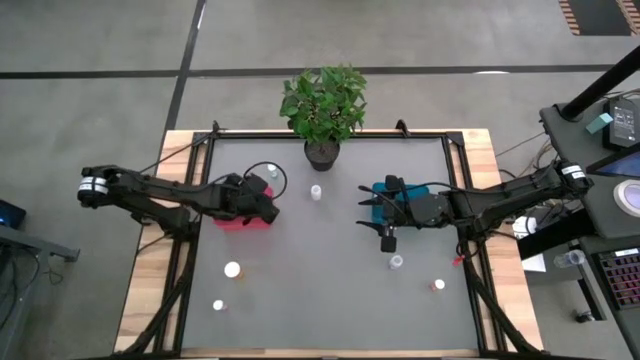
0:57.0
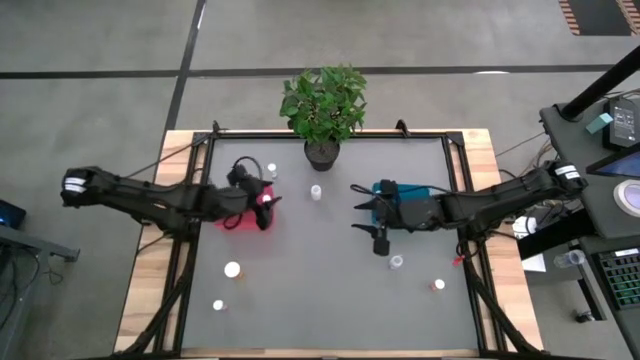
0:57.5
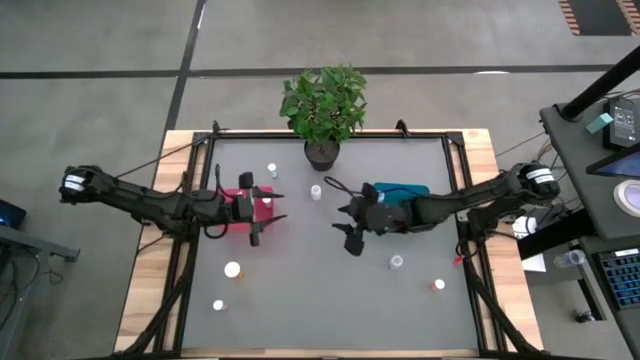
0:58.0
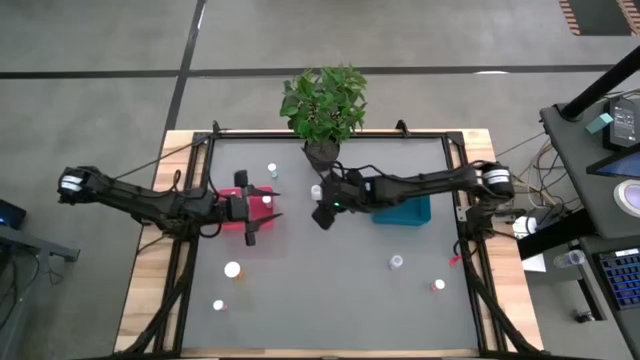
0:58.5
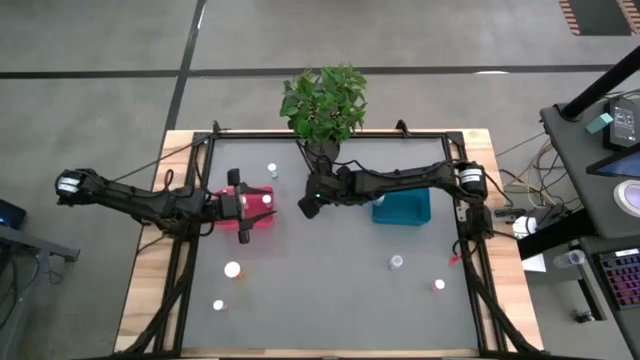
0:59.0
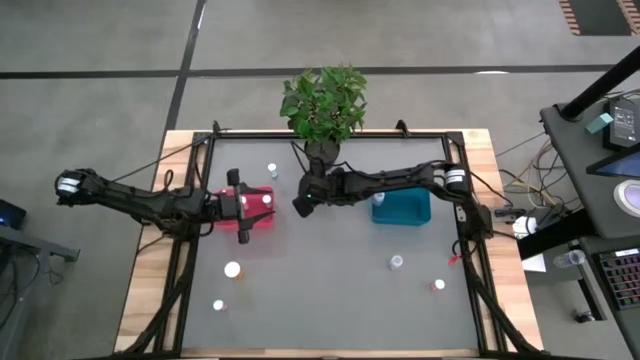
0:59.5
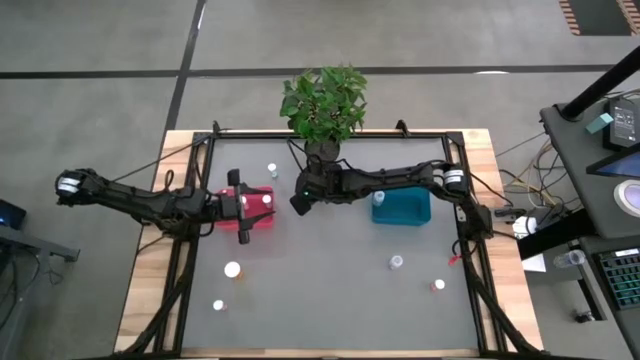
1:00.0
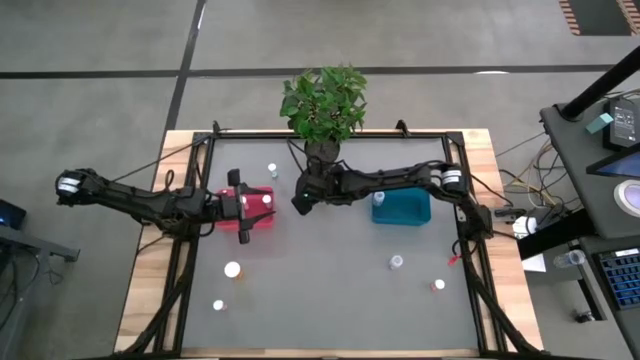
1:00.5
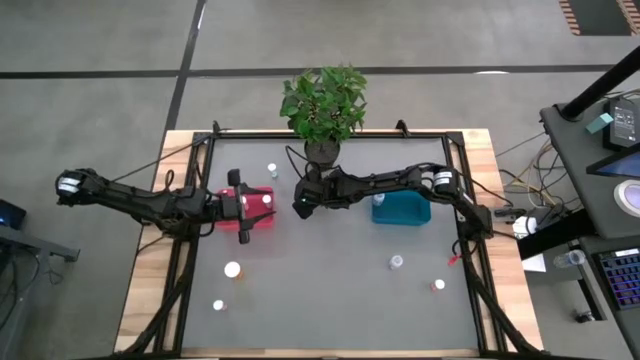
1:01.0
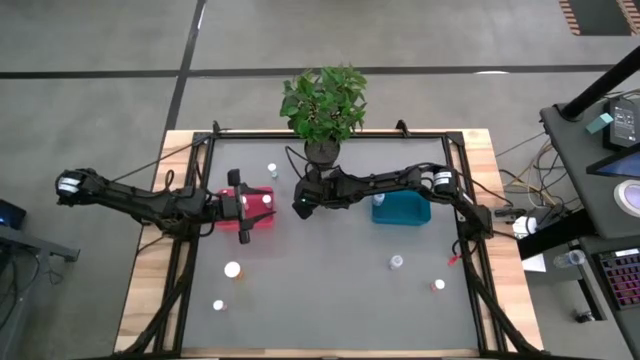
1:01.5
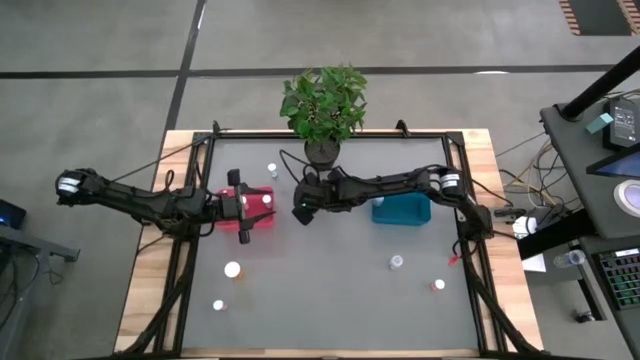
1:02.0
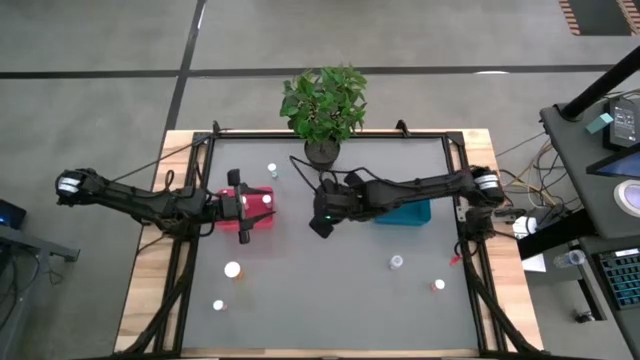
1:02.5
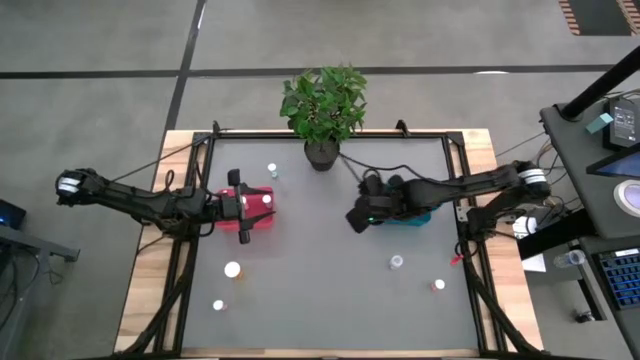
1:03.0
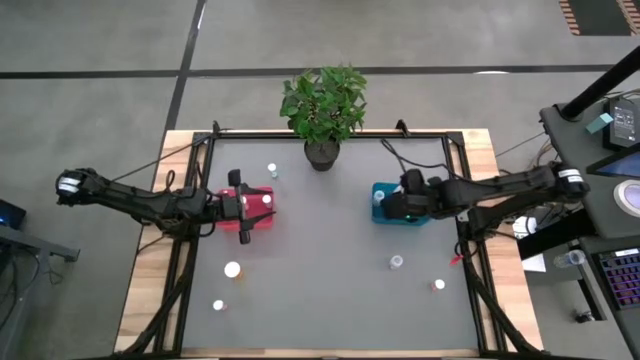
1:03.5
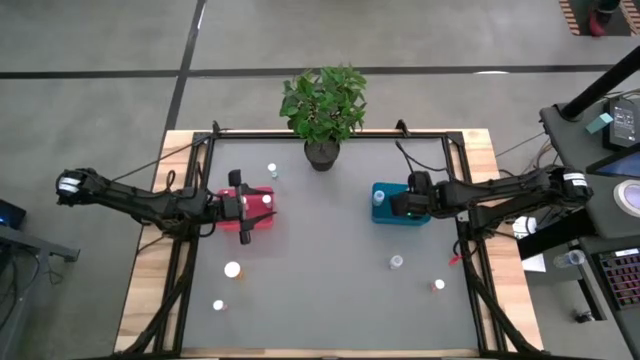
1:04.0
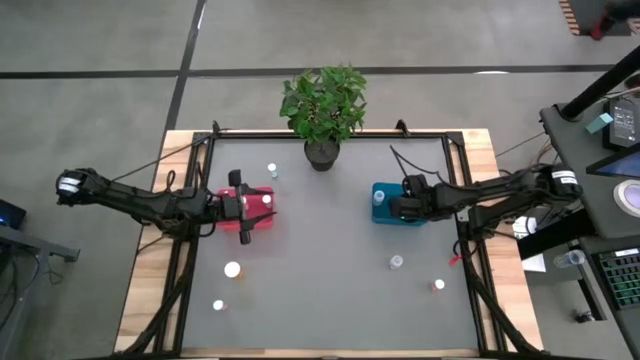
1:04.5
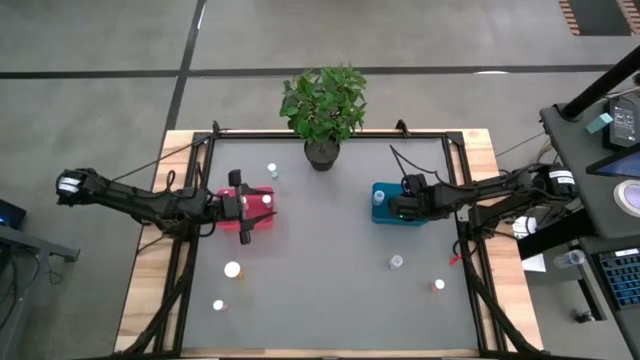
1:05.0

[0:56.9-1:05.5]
Task: Pick and place medicine bottles into bin by pill shape (circle, oval)
Put the top transparent capsule bottle into the blue bin

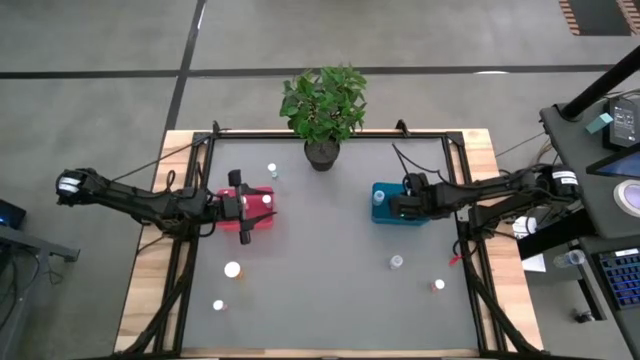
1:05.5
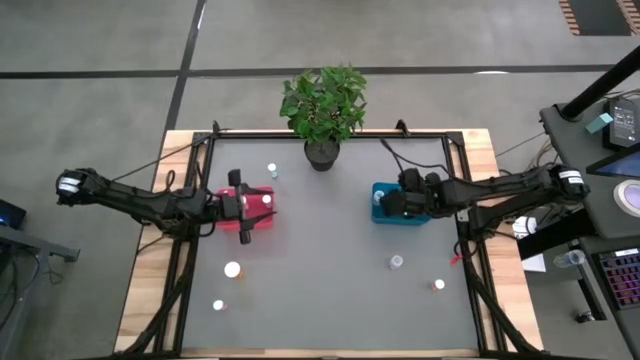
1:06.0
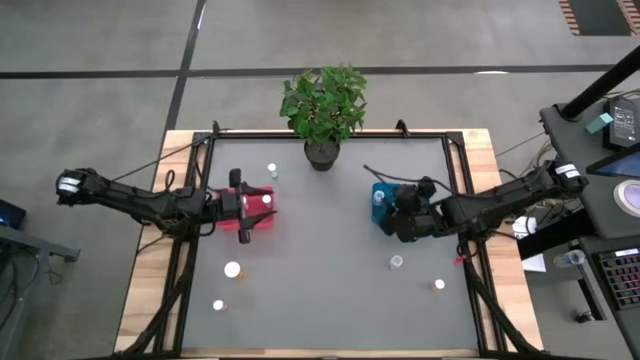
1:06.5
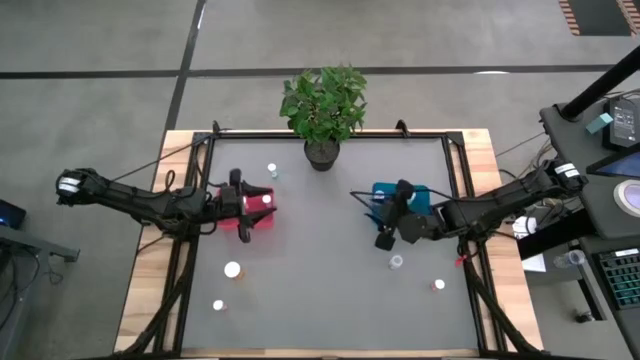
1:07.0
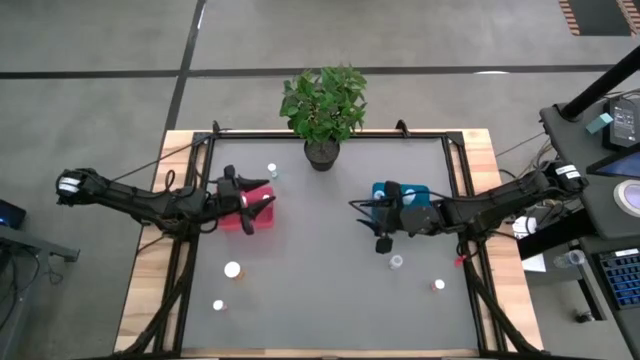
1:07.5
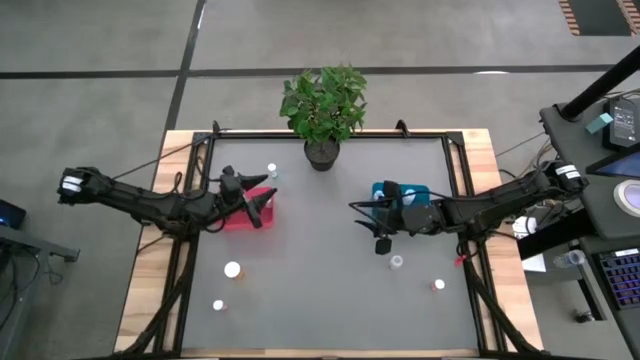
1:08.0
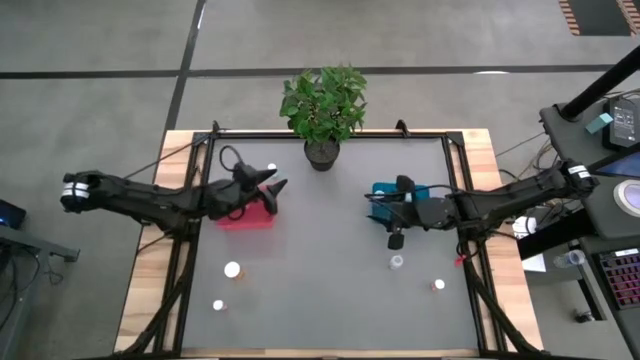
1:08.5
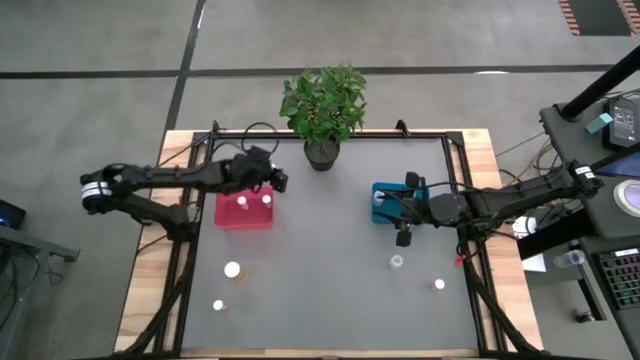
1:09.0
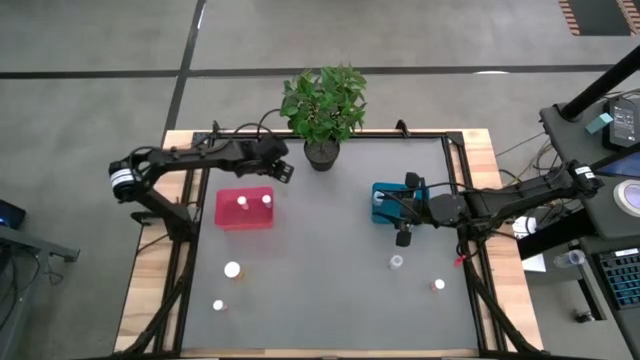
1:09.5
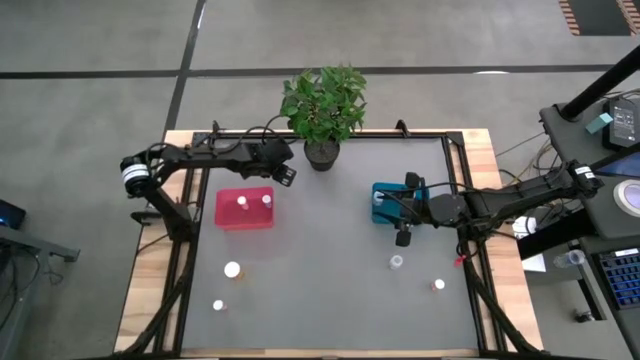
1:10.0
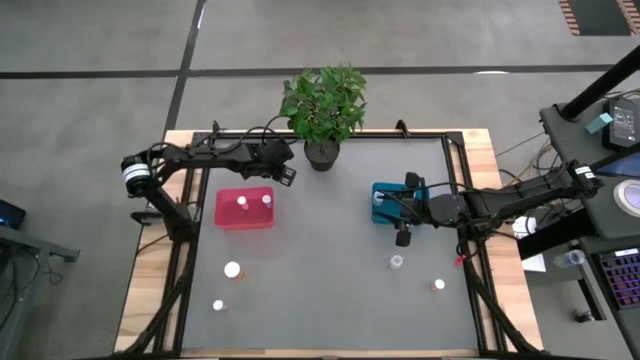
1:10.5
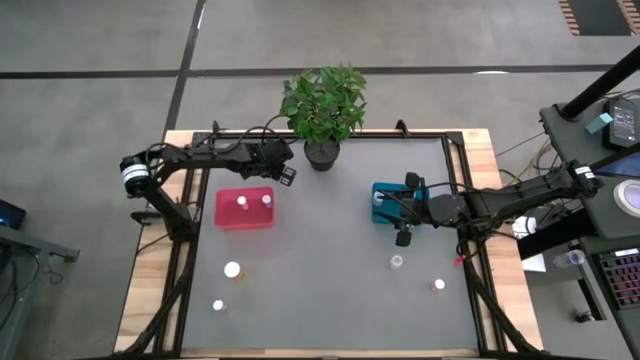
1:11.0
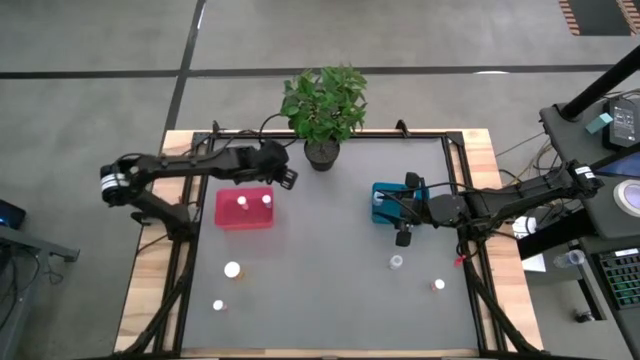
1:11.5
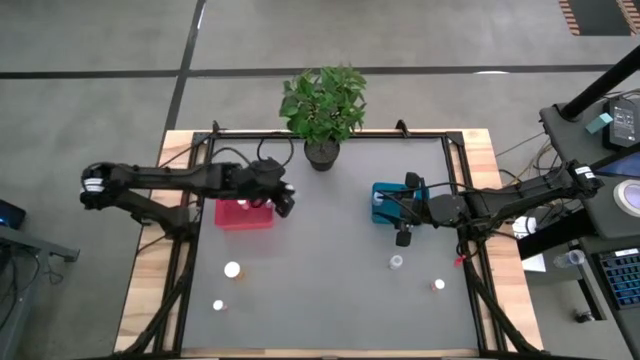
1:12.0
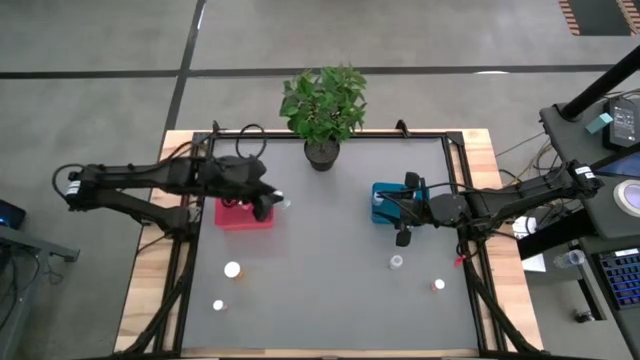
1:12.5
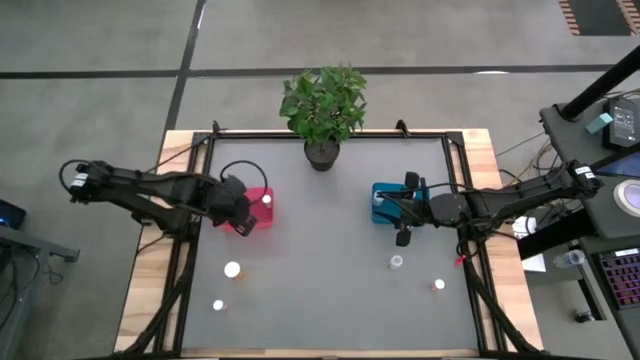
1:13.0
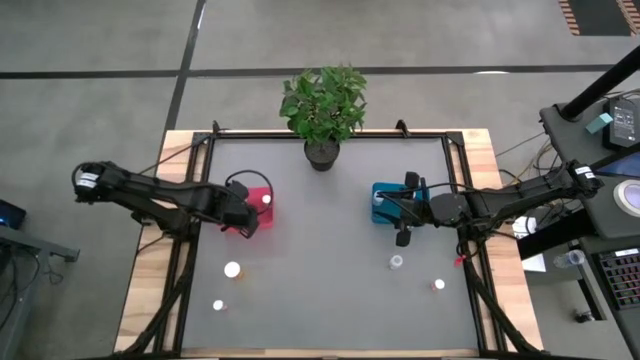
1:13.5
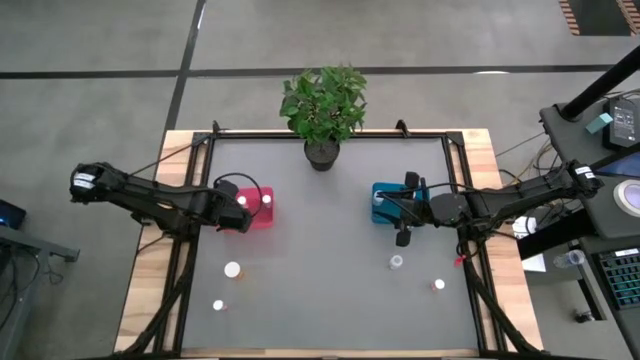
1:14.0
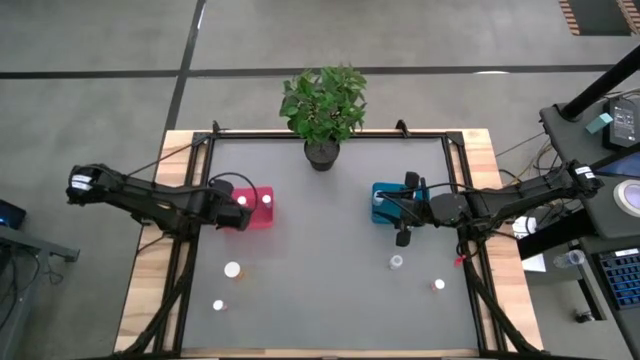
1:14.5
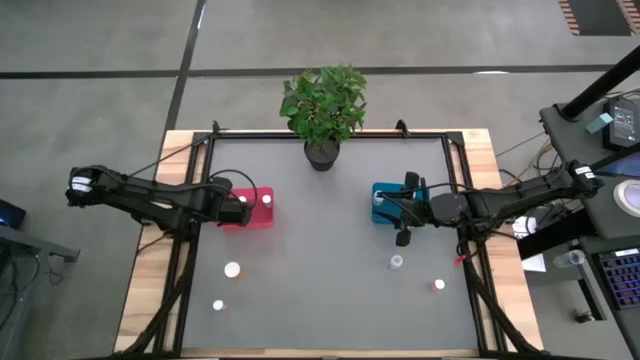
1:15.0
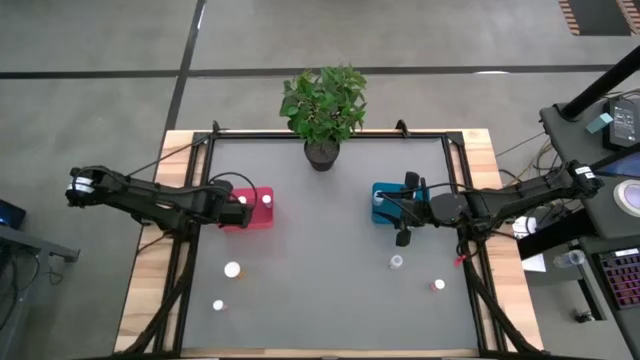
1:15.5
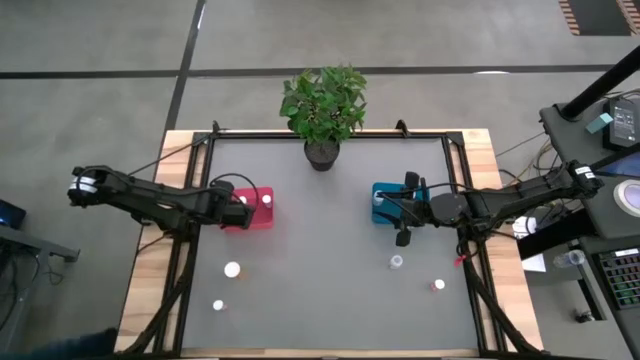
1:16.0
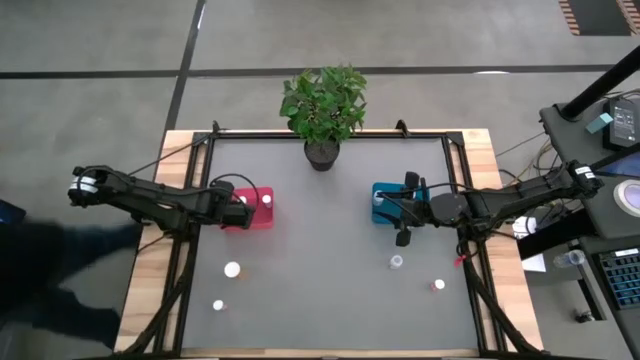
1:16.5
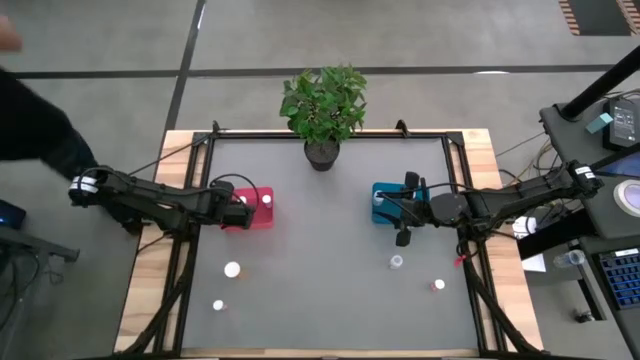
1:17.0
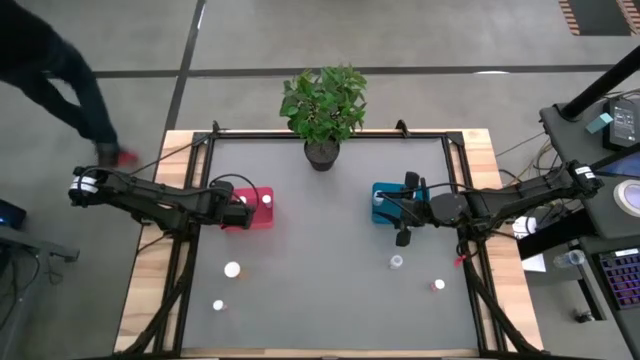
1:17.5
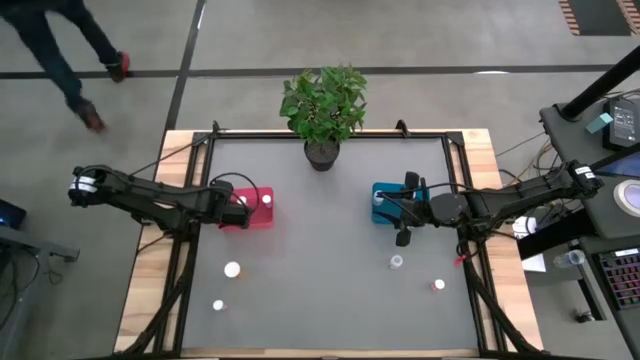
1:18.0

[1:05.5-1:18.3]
Put the blue tablet bottle into the red bin
